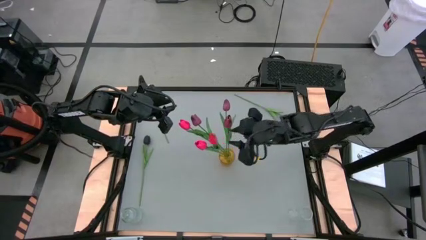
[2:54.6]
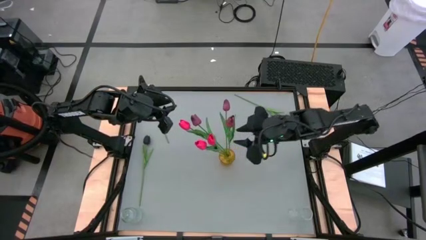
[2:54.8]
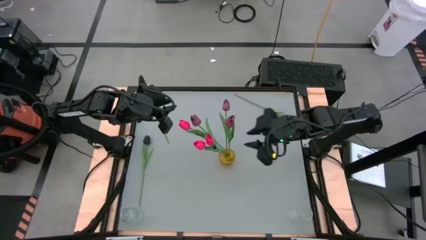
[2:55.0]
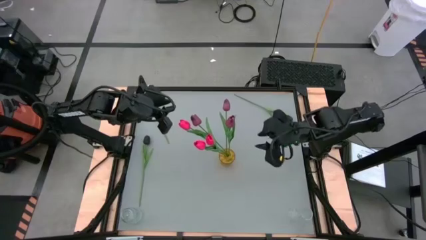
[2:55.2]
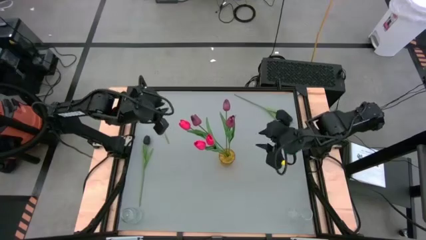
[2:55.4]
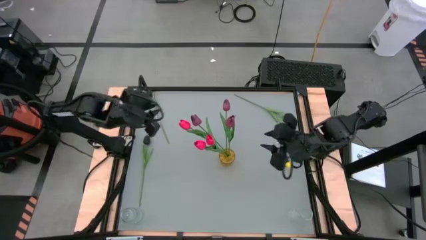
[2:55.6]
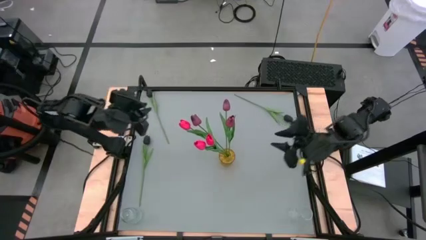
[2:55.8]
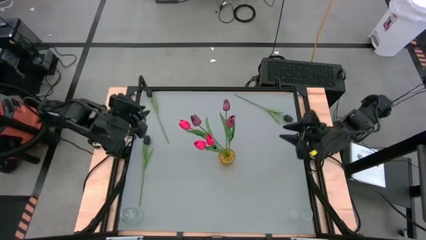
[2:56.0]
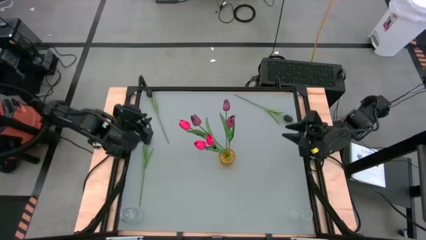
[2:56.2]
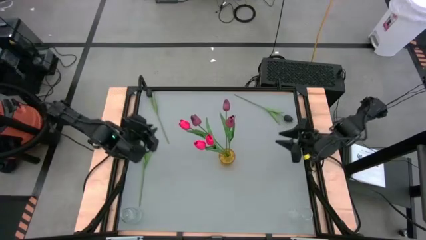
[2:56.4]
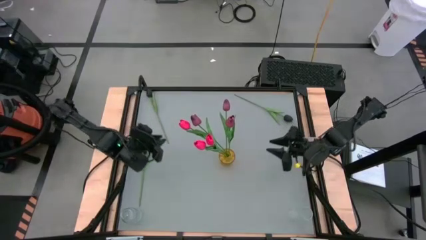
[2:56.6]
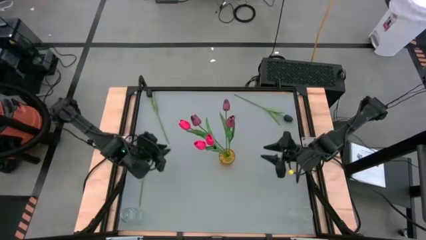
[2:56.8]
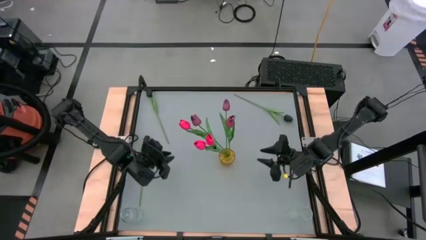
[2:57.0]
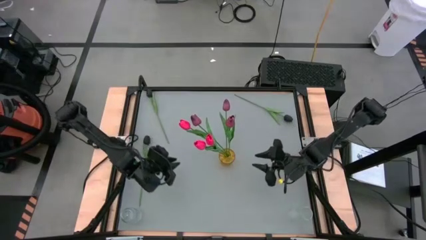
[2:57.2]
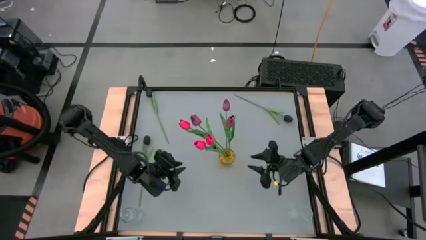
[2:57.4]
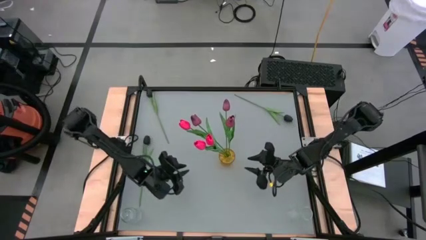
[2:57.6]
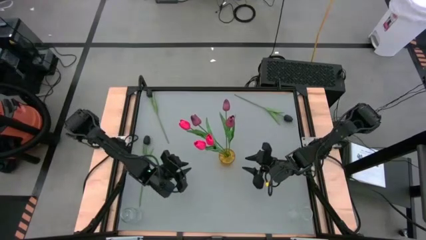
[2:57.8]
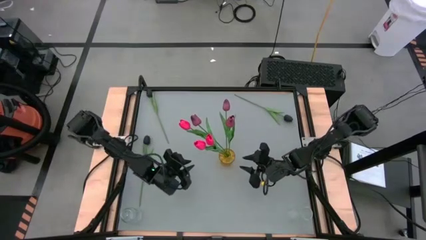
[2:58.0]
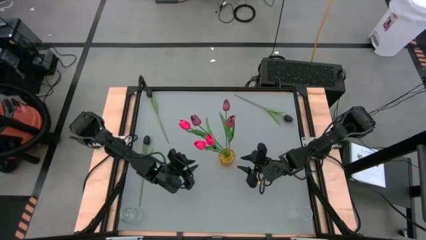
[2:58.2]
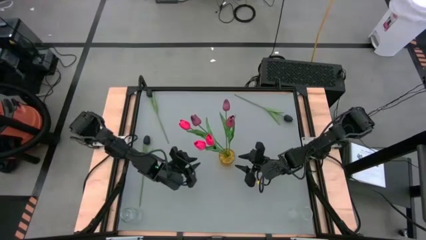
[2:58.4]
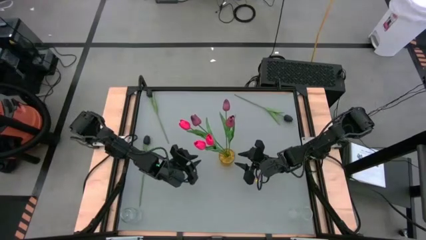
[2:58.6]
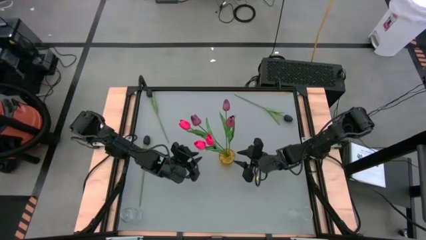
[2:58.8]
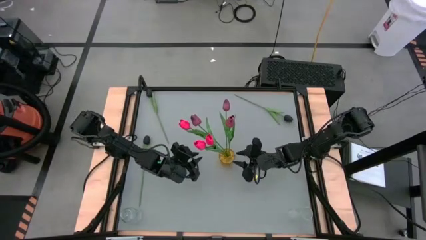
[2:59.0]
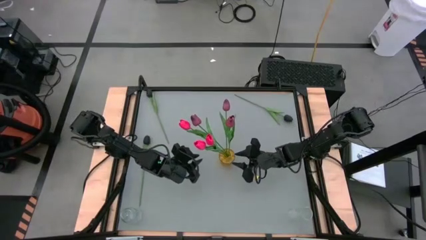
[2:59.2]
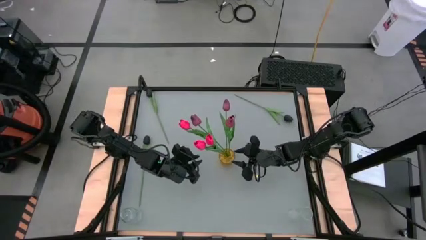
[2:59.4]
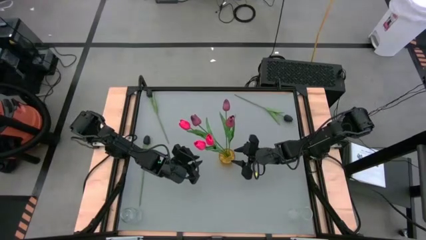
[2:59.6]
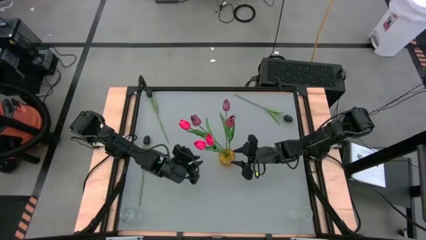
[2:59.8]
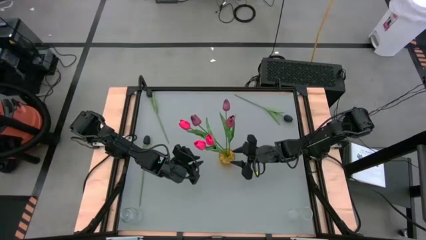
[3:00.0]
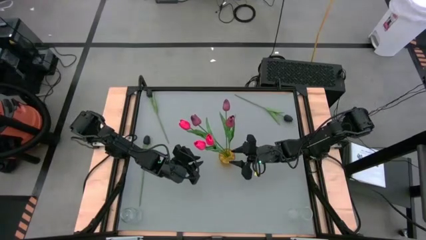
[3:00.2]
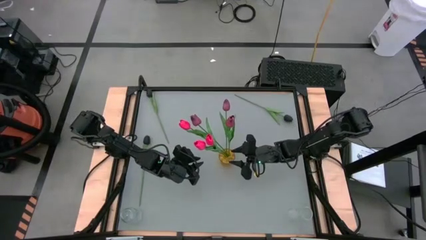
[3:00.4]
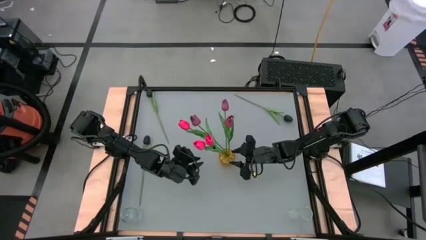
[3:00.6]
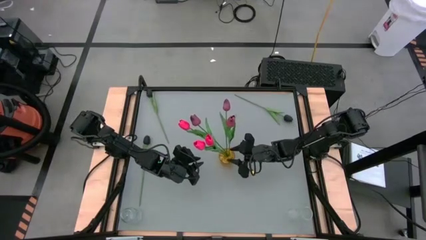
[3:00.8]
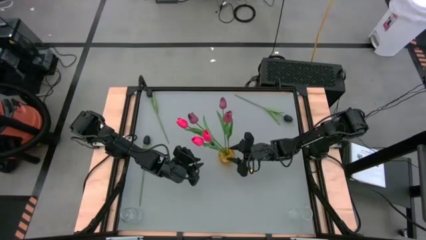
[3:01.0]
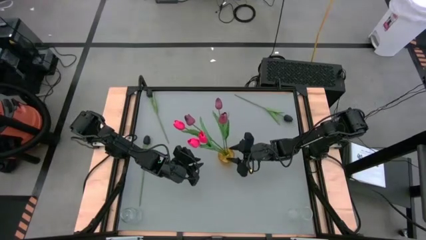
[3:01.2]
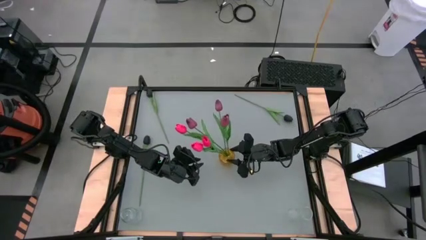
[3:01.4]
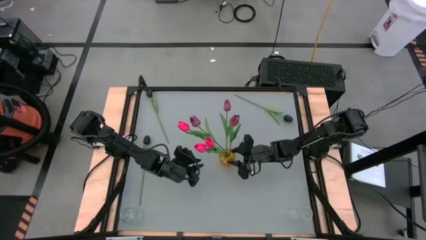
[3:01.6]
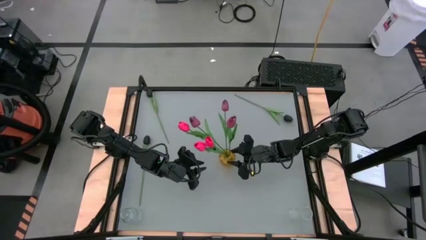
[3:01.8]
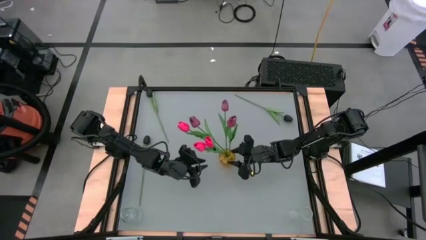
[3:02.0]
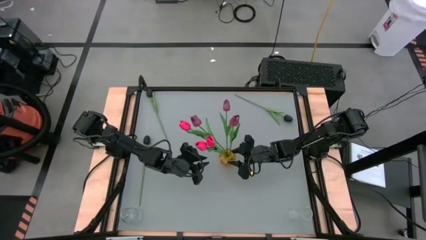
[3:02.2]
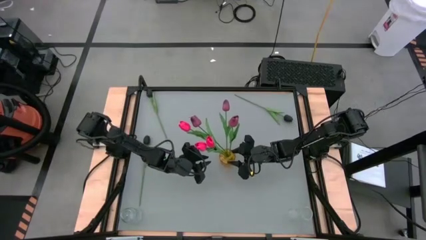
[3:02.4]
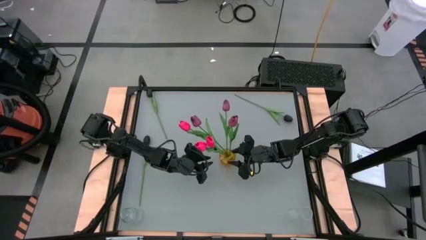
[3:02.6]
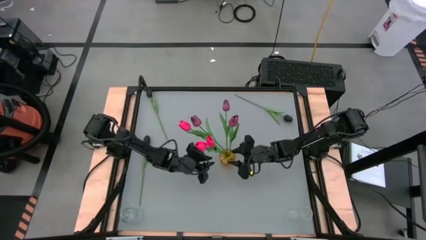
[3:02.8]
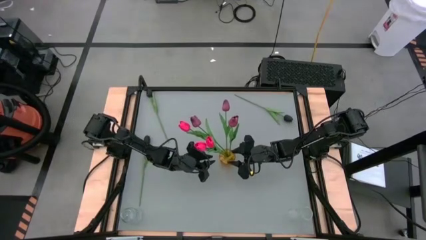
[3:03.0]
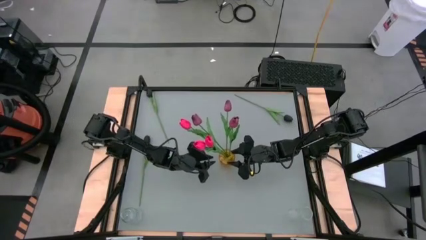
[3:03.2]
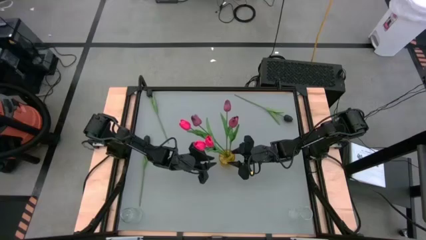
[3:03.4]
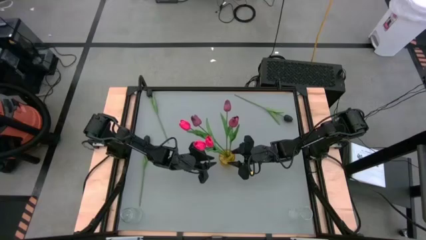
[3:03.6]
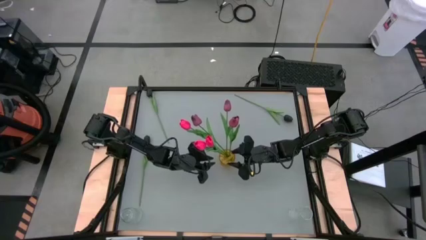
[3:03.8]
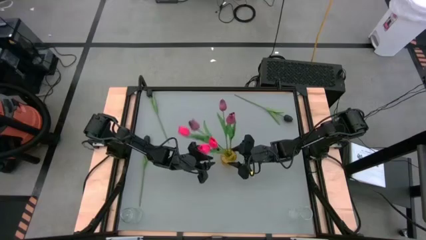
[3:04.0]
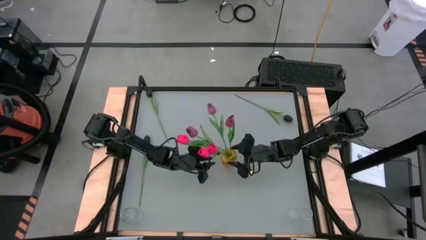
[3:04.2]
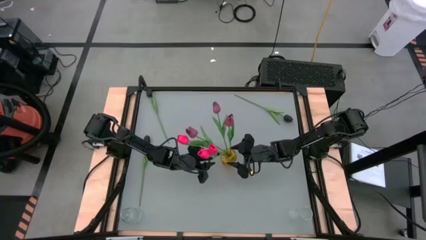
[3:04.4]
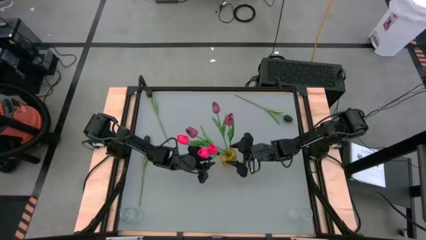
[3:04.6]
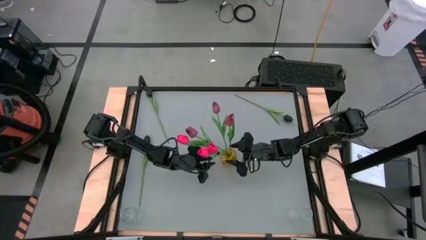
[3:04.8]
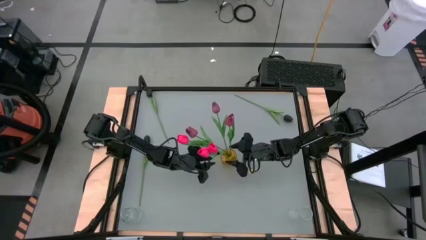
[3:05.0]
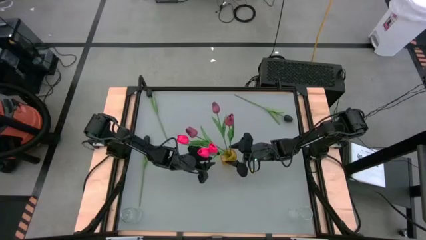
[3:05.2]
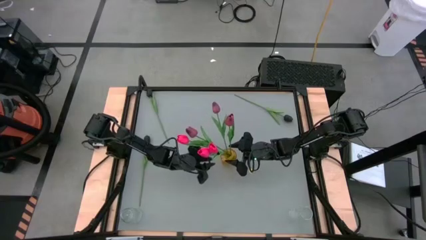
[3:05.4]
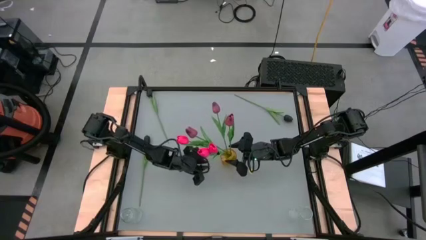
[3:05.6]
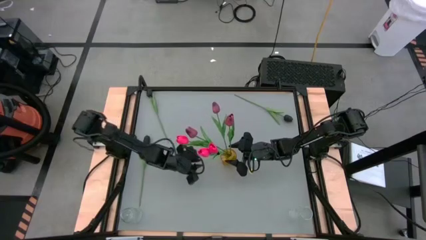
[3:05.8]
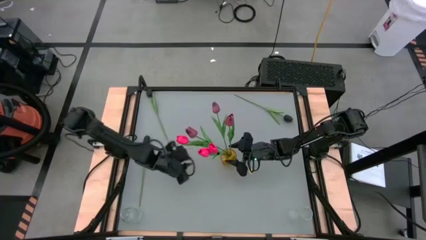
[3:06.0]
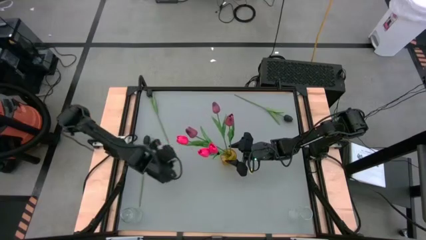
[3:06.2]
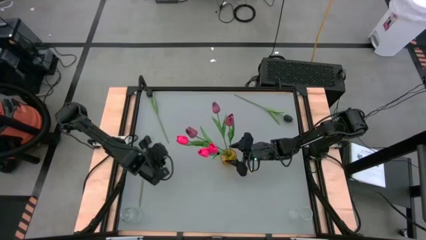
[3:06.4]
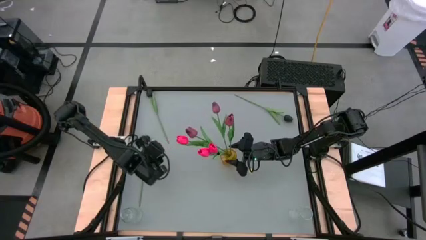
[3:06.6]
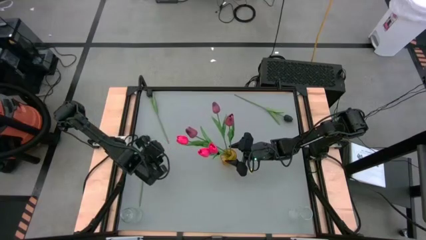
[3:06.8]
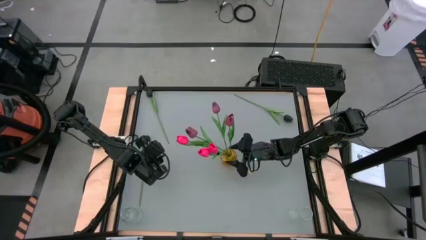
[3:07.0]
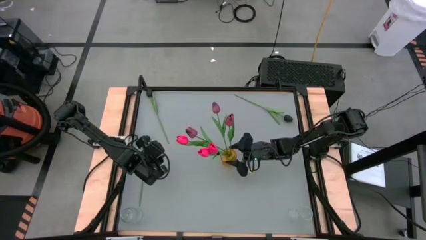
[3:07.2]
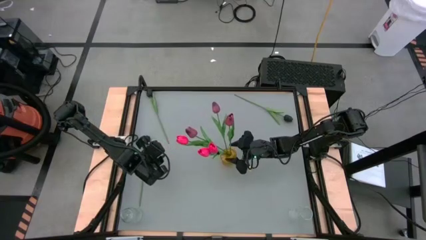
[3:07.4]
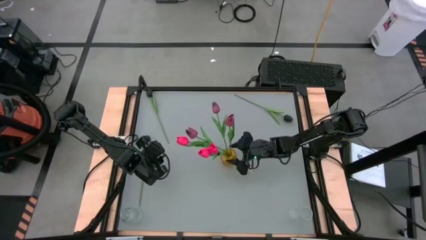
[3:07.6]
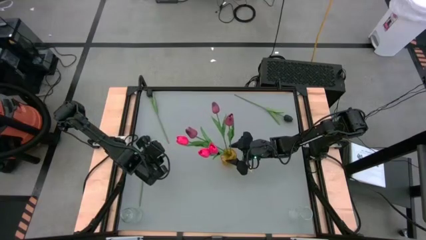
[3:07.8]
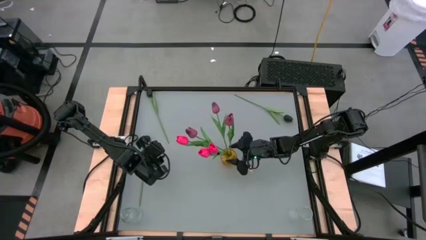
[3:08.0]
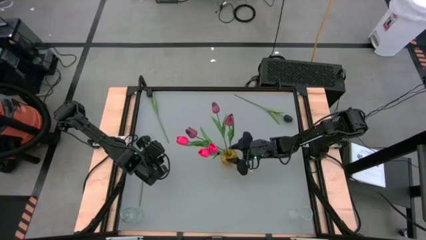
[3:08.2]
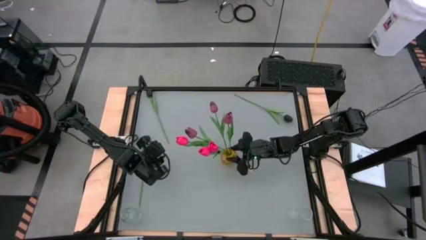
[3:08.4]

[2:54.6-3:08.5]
Task: Sort flowers into vase by color
Move the yellow vase to the top of the table
